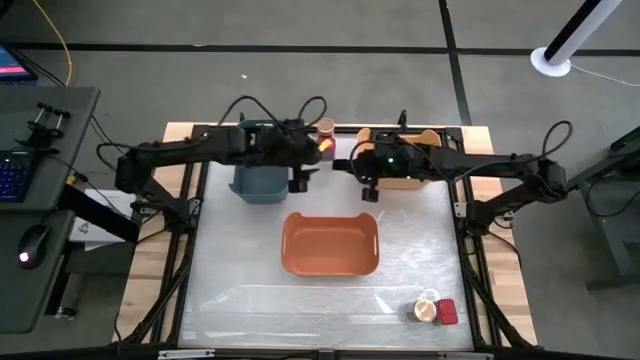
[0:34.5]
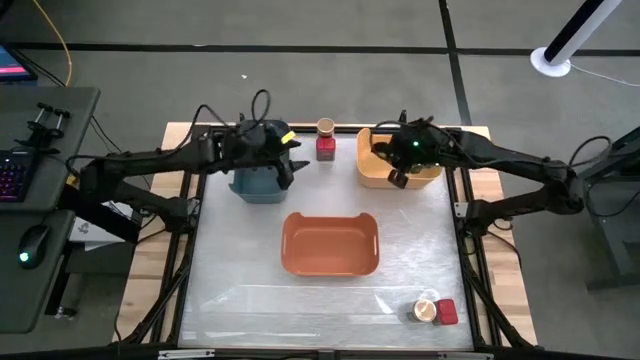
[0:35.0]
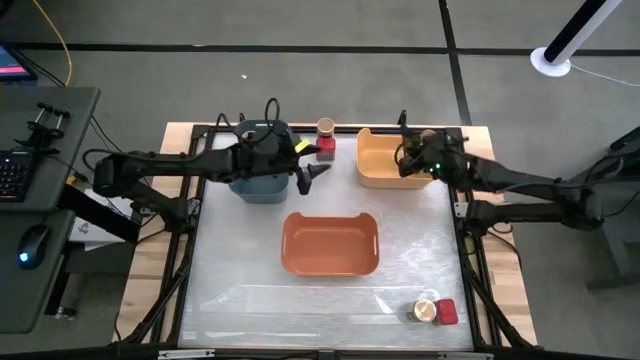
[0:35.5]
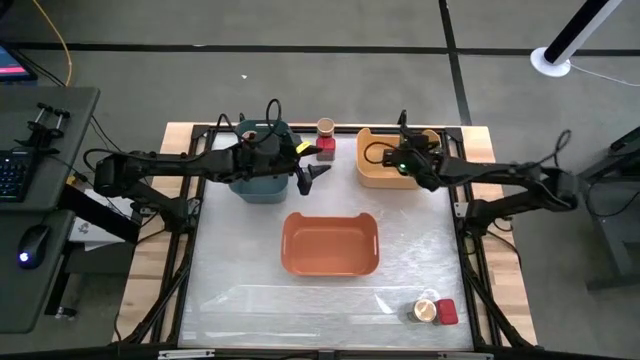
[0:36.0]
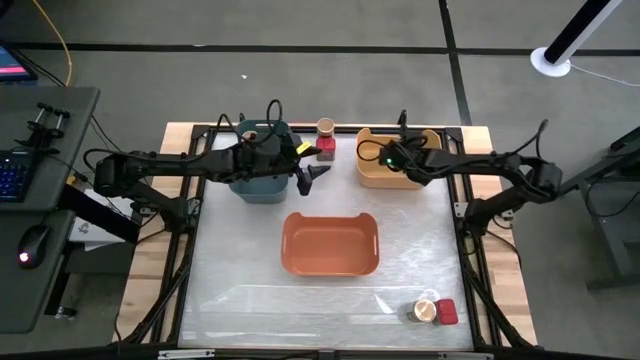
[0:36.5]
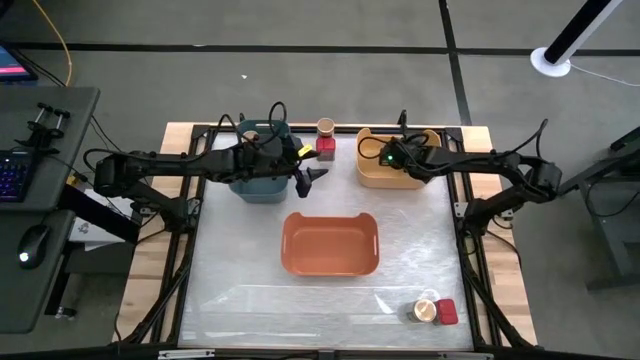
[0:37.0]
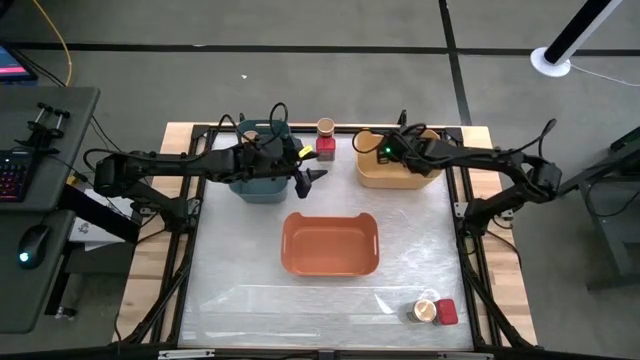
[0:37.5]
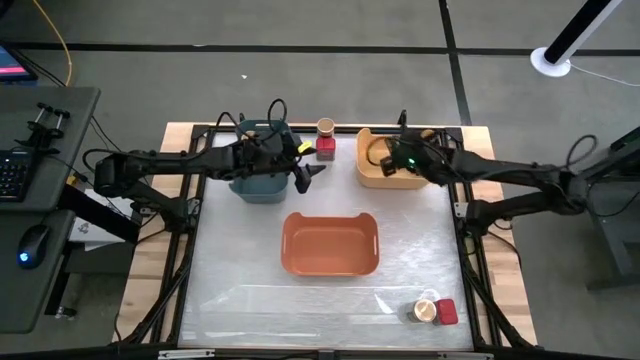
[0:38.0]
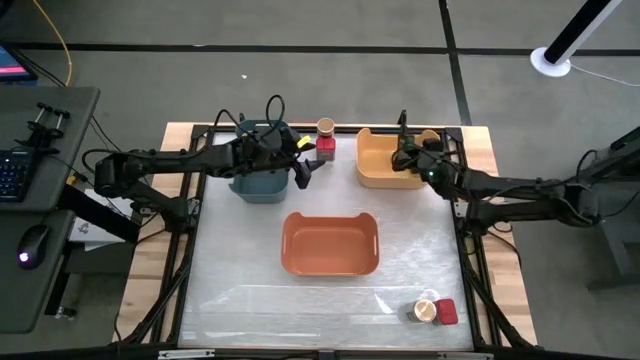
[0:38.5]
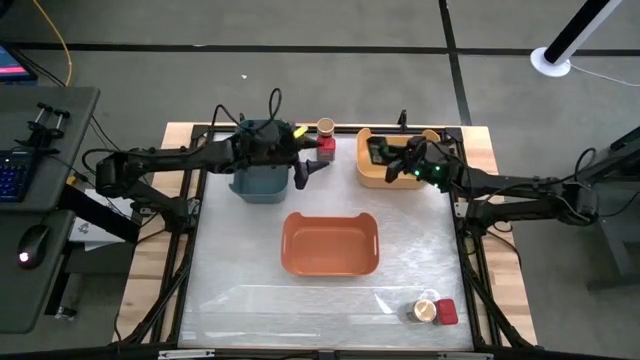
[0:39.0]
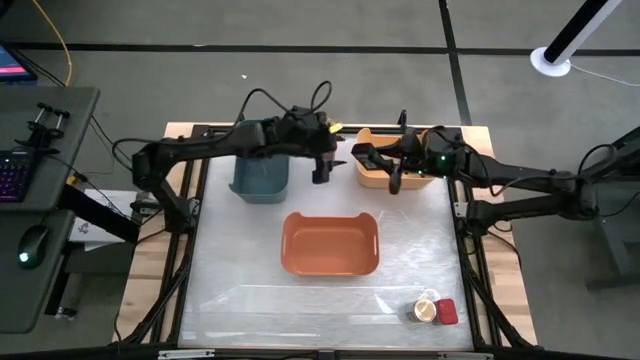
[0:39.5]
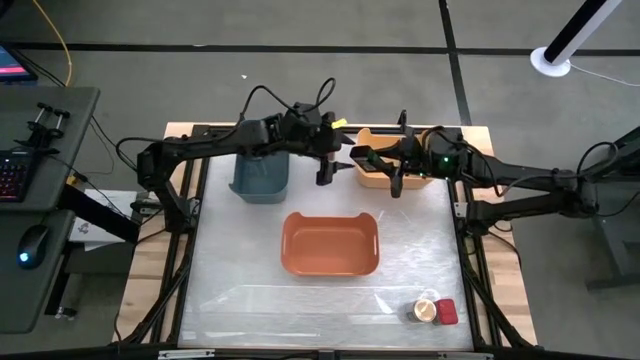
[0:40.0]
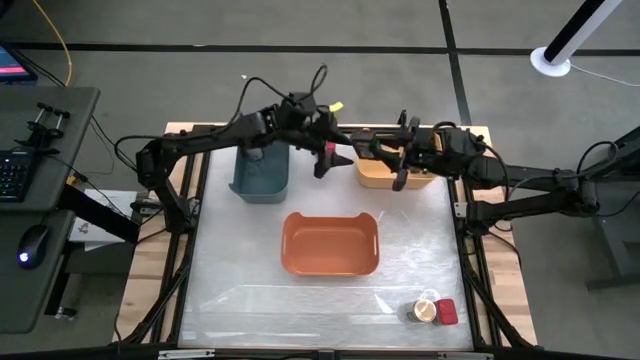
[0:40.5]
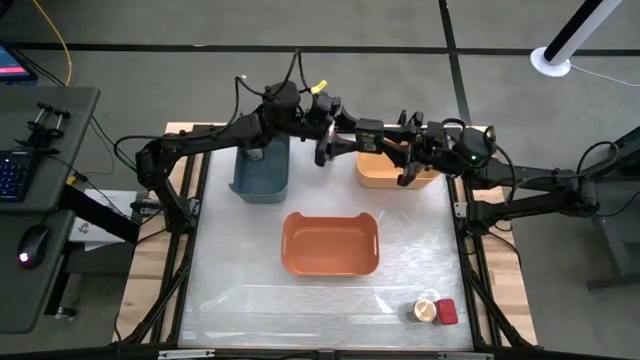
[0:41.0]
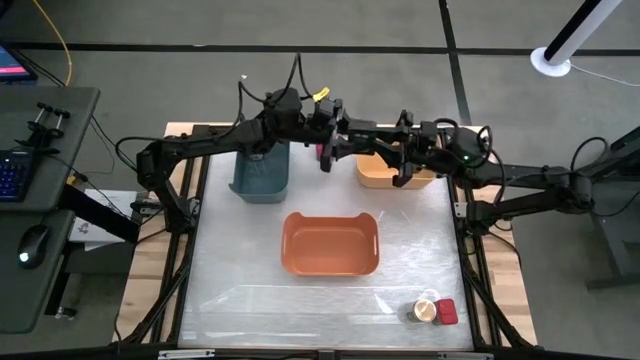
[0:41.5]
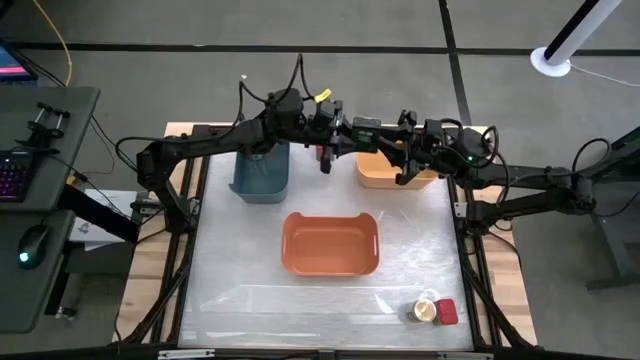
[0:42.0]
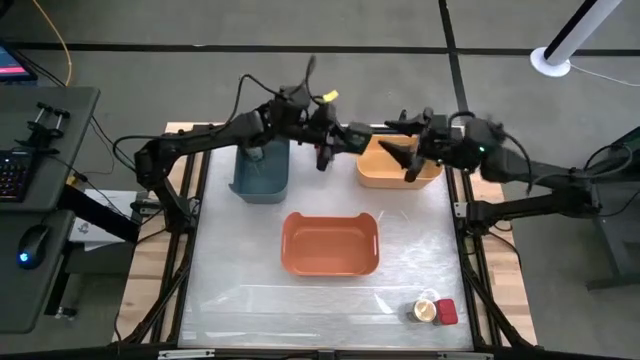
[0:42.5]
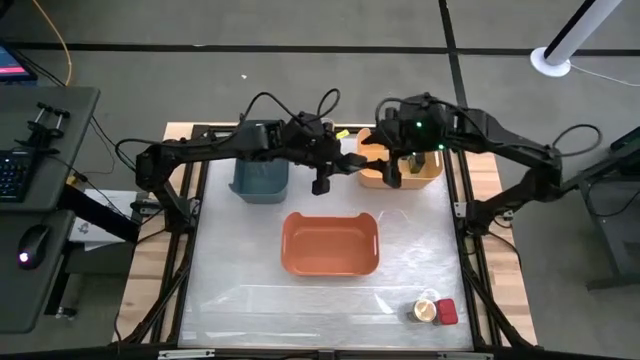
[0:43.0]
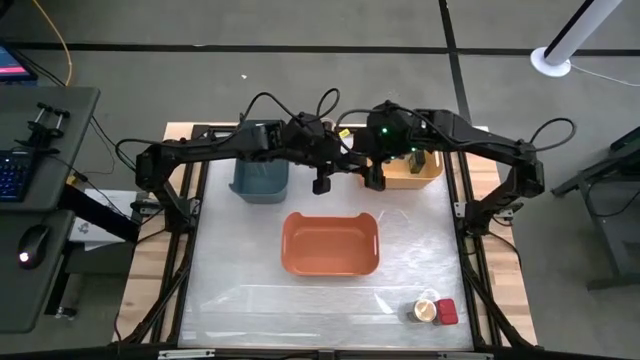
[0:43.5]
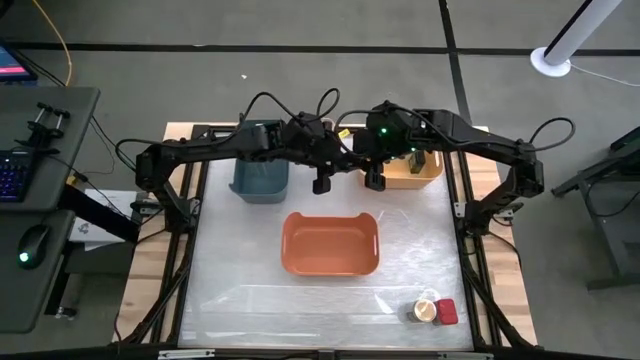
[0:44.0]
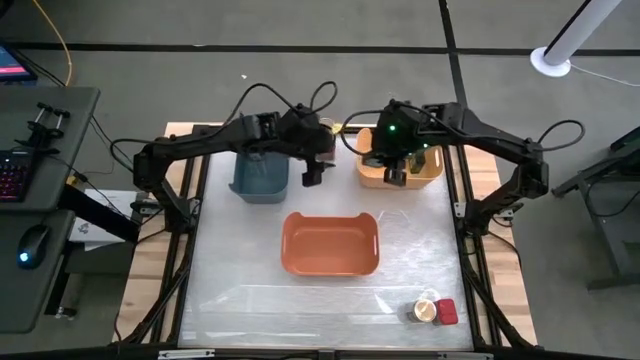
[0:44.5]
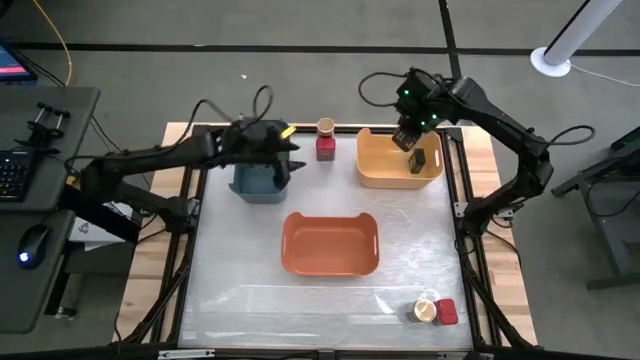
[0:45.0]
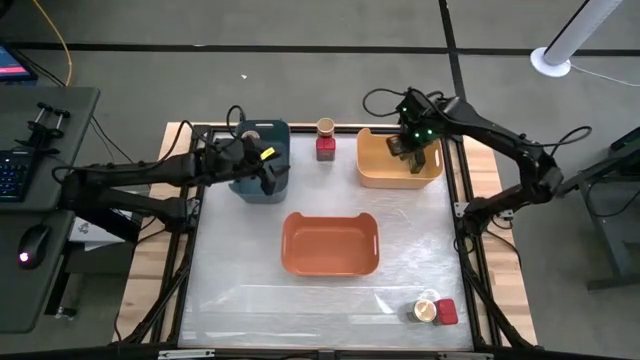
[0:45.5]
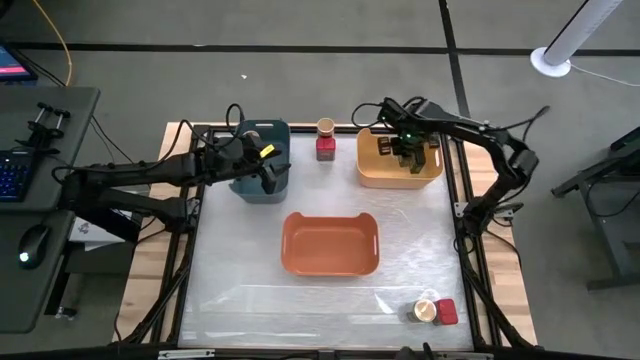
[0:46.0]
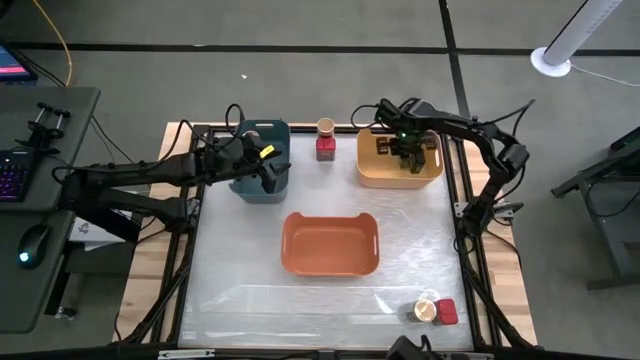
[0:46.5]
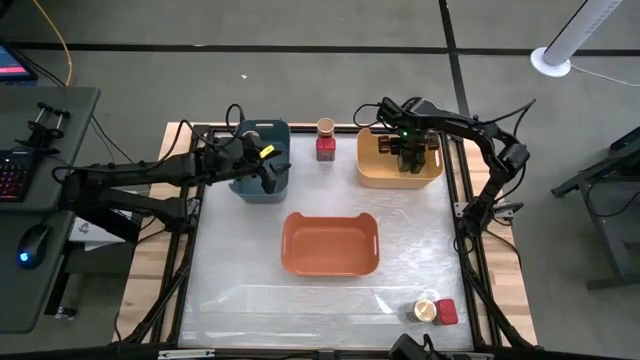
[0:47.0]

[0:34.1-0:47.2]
Task: Sort spices by type
Put the black seasoning can into the yellow bin
